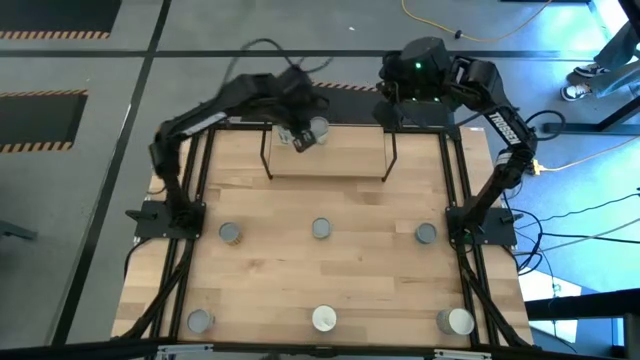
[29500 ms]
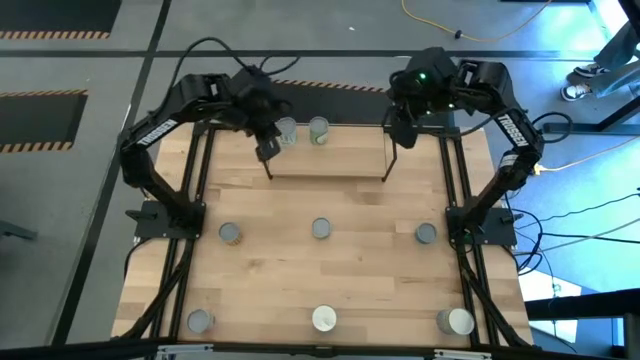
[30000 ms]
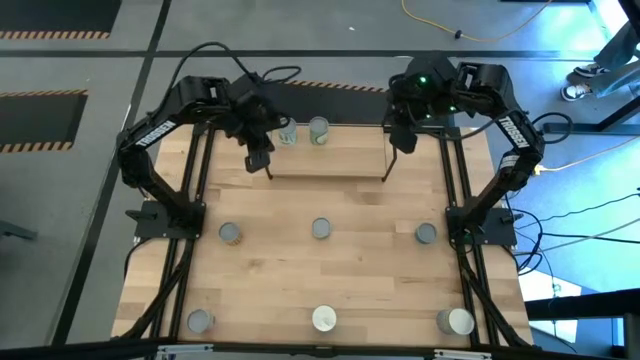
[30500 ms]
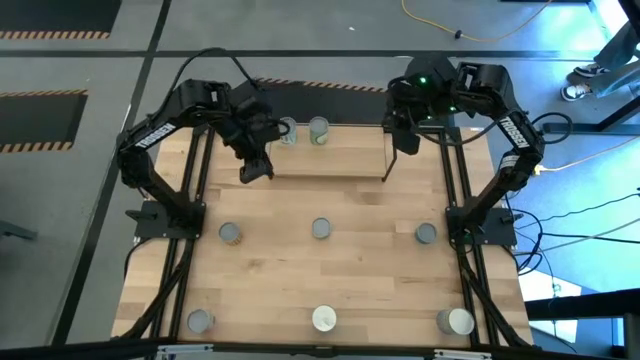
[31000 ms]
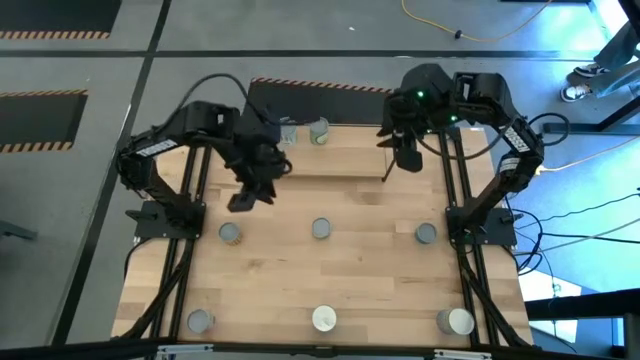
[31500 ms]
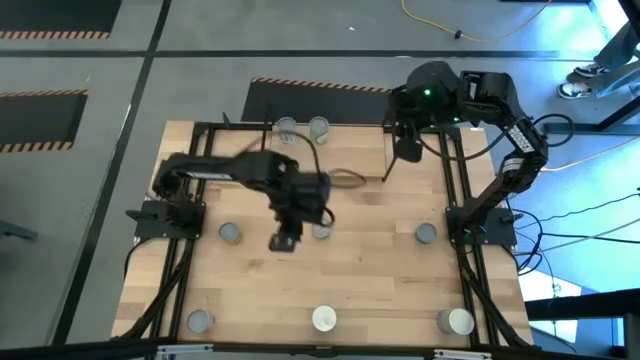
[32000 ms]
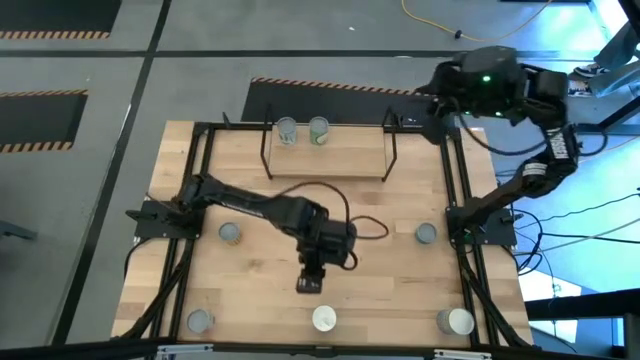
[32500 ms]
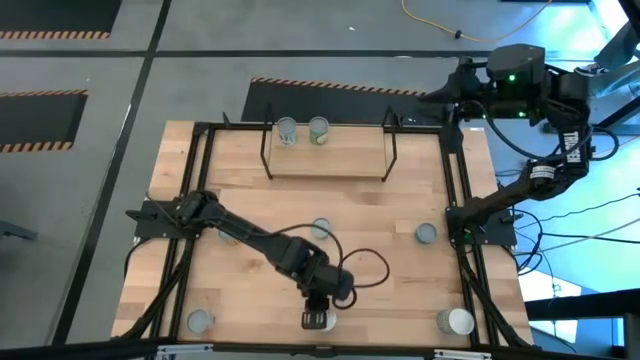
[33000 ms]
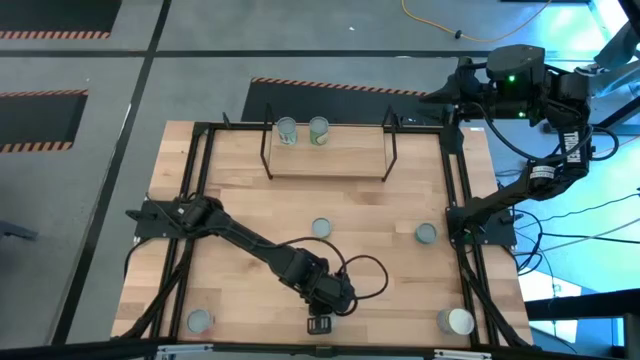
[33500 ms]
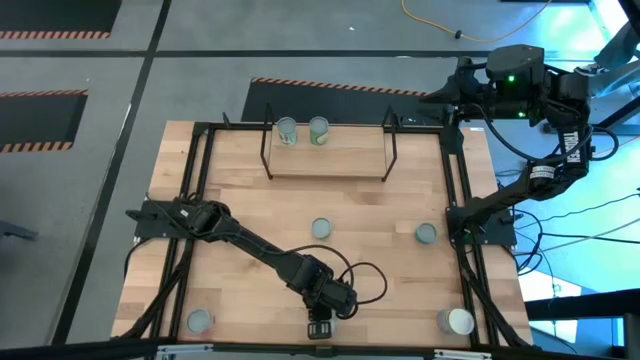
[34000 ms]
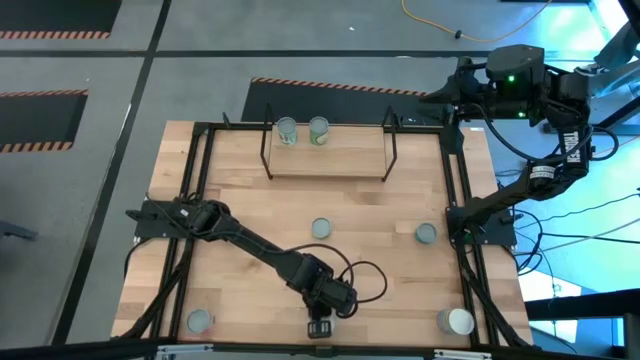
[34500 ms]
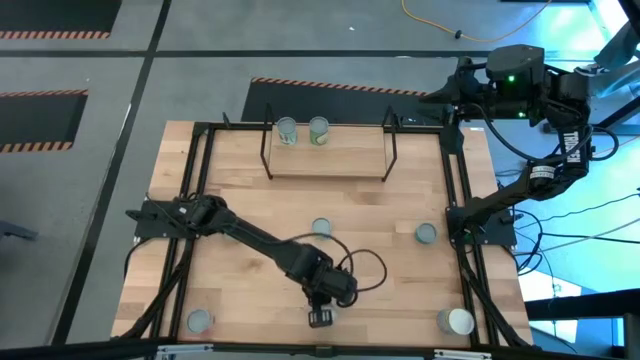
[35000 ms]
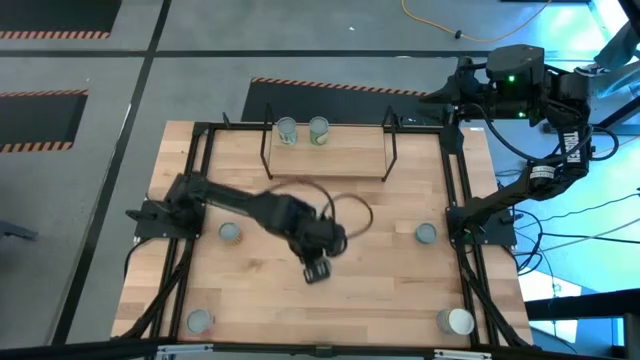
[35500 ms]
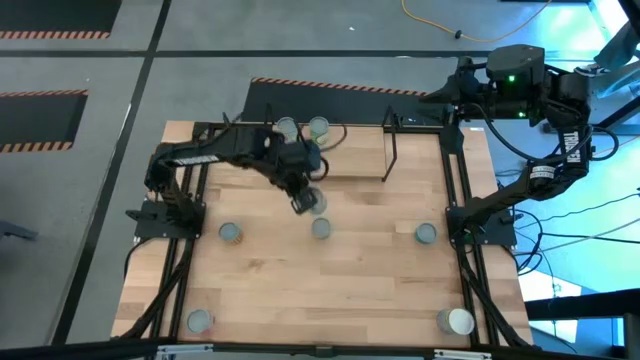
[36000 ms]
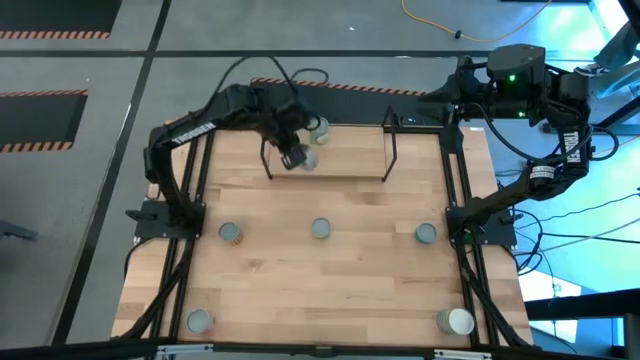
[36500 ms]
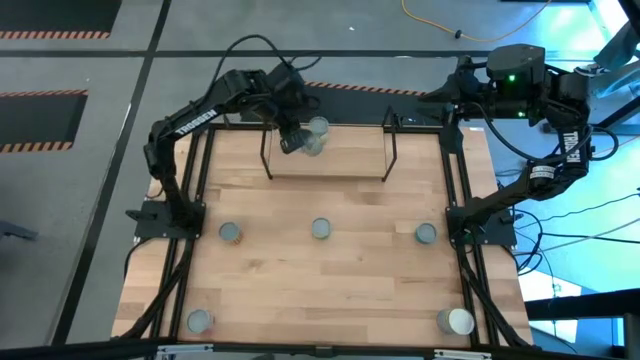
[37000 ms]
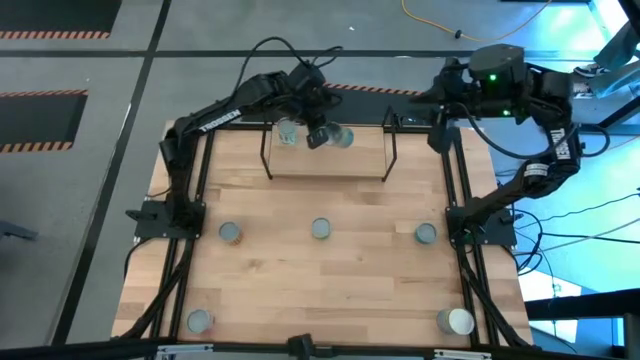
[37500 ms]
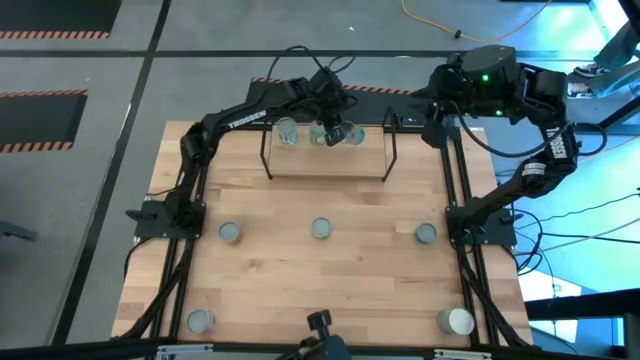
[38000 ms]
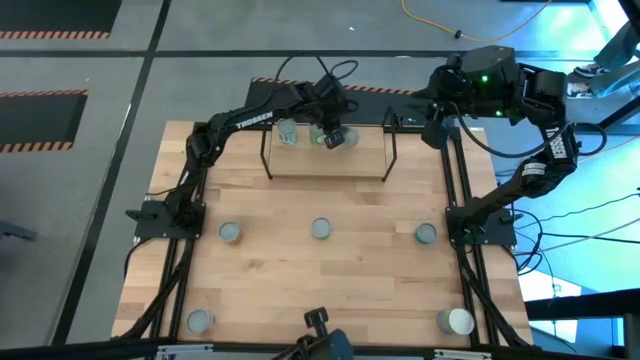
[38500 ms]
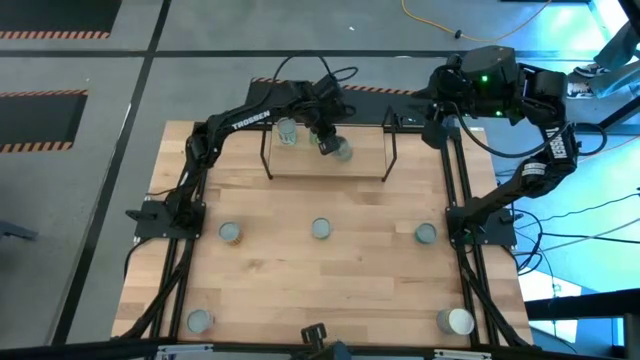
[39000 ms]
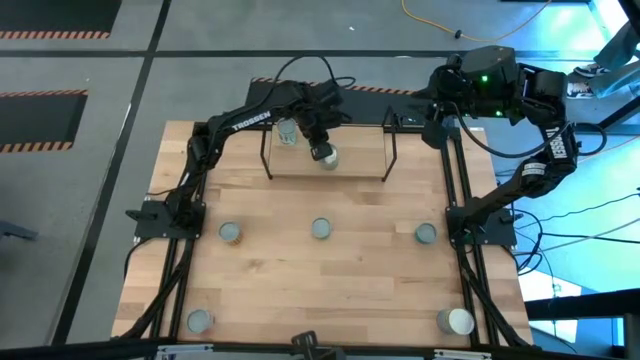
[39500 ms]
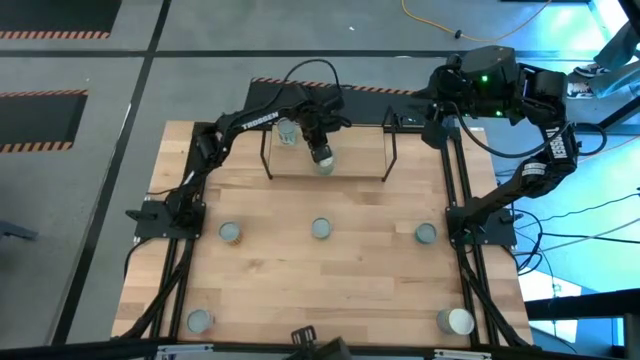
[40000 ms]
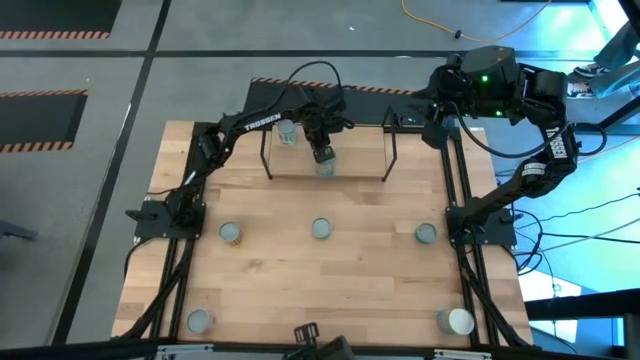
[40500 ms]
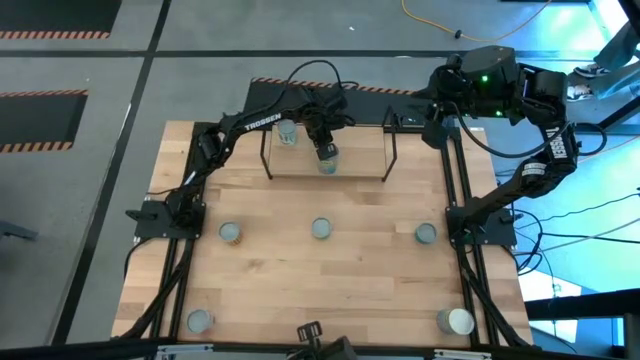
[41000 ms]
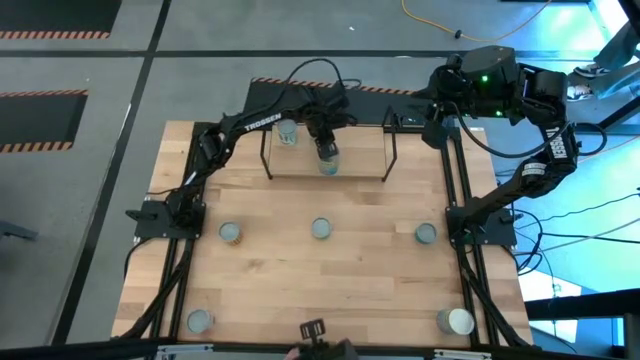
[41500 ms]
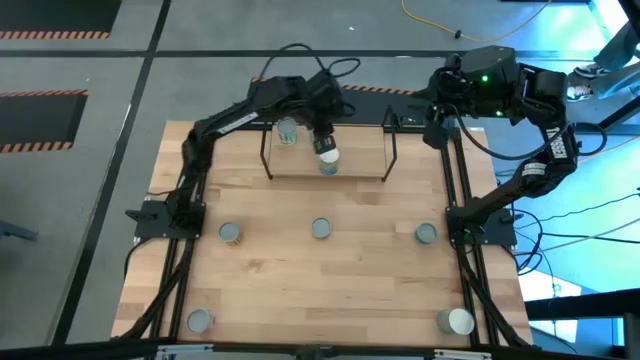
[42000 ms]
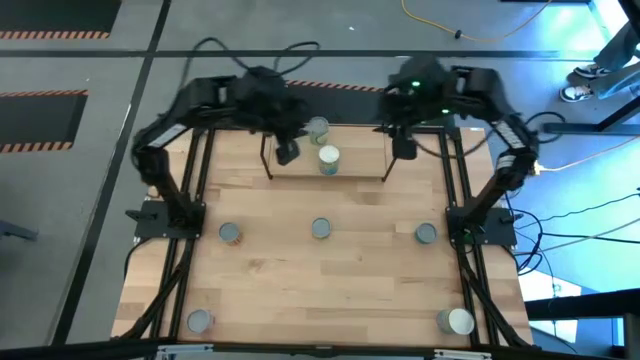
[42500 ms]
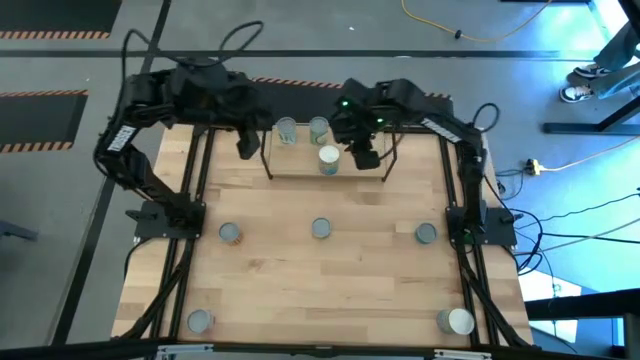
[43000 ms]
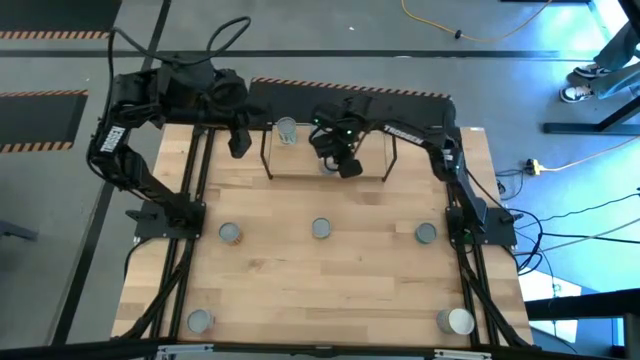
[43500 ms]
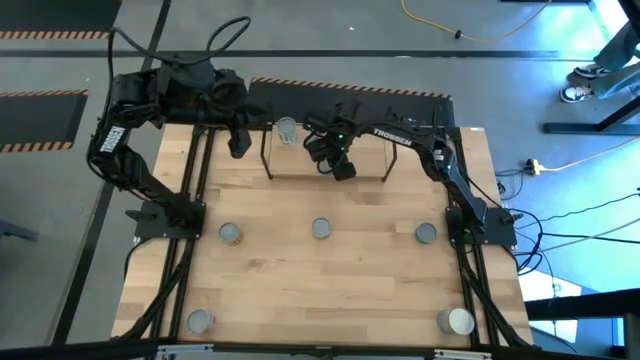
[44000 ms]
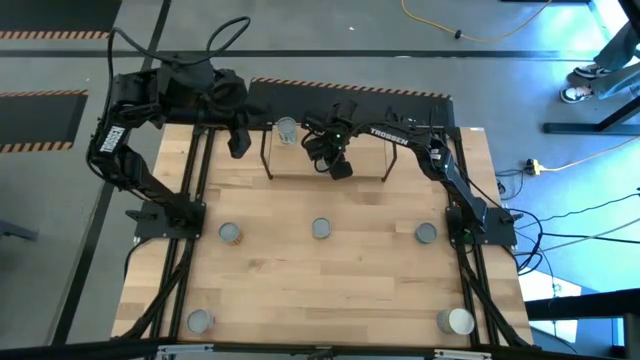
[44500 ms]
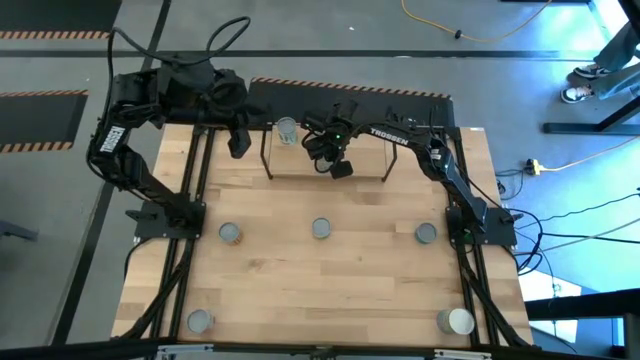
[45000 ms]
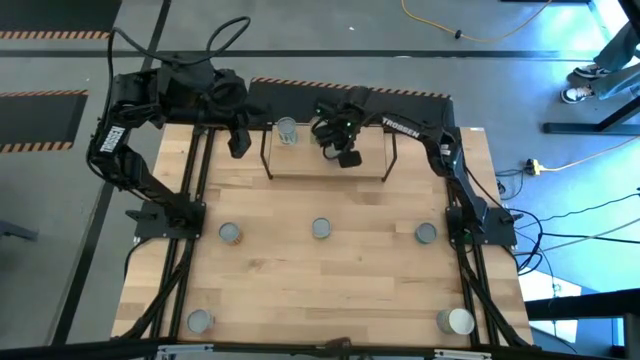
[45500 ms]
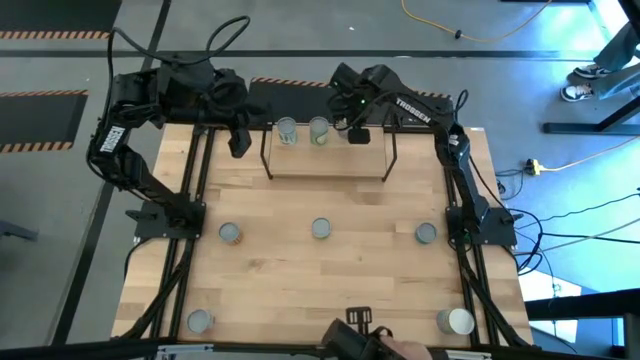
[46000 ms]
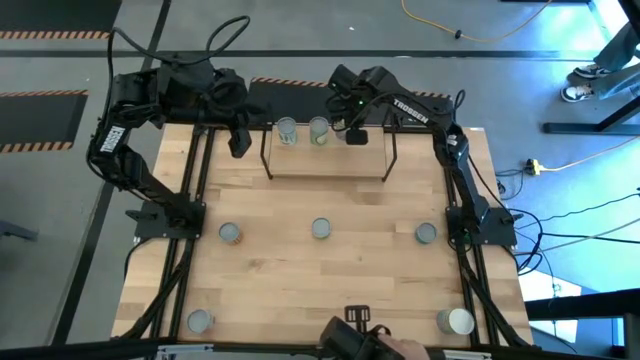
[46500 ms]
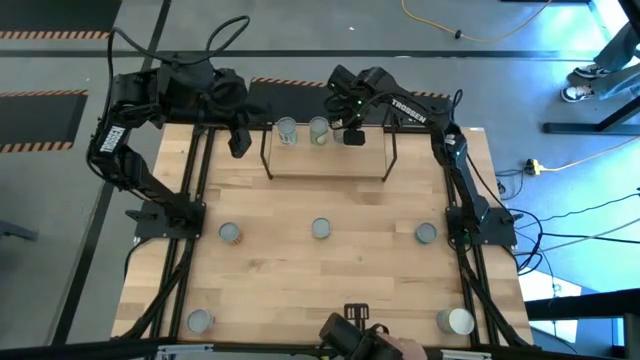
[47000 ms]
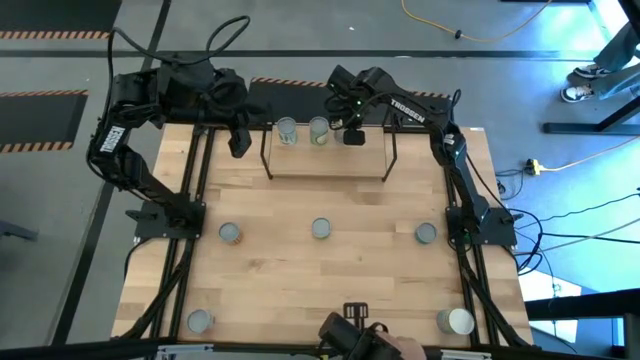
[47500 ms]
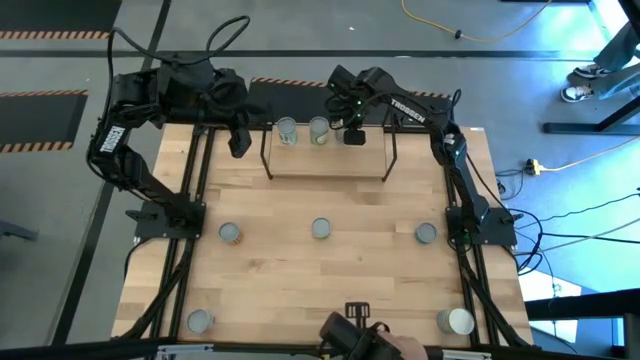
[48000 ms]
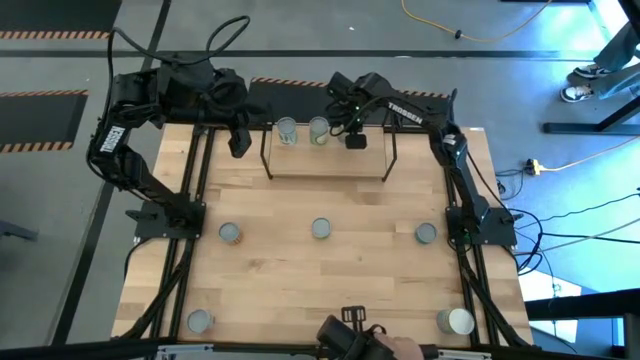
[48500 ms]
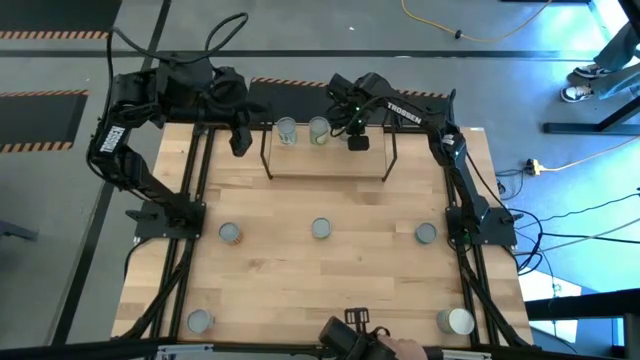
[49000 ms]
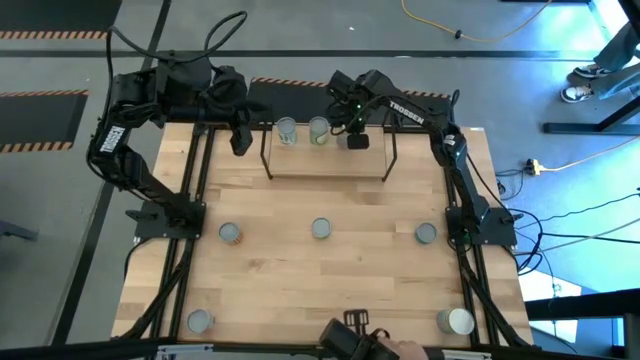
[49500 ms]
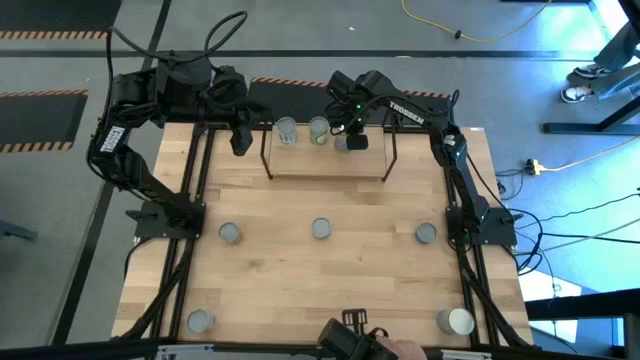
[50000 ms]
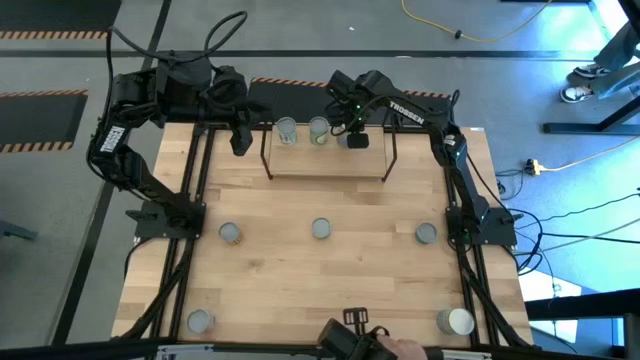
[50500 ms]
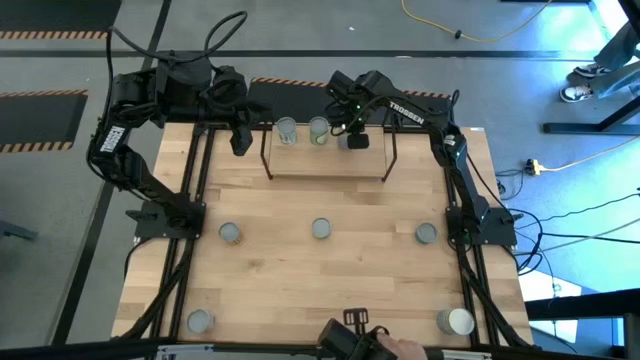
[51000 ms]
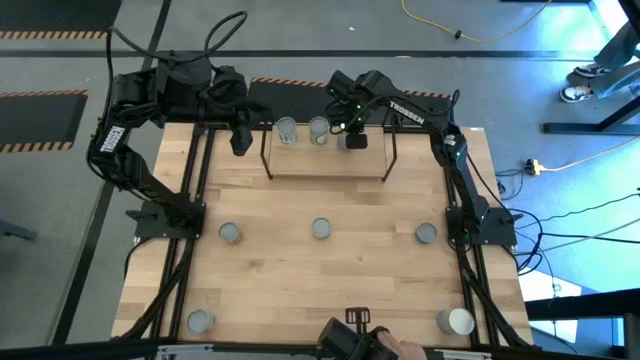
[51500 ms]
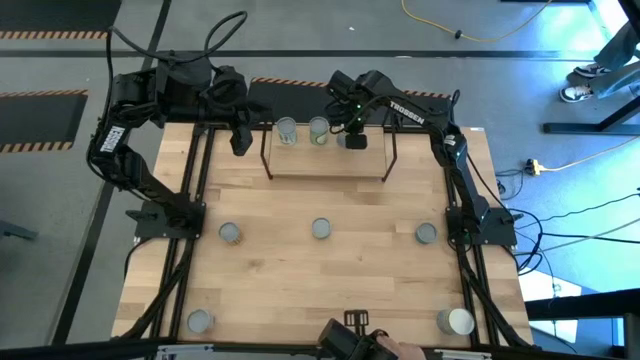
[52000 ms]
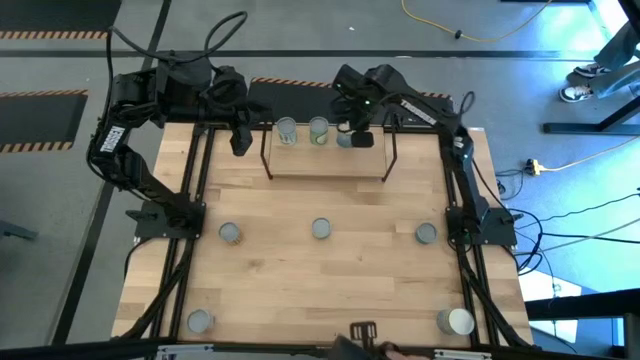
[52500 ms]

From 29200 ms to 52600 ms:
Task: Pick and place cans onto a shelf
Put the bottom middle light blue can on the shelf aligned with the pink can
